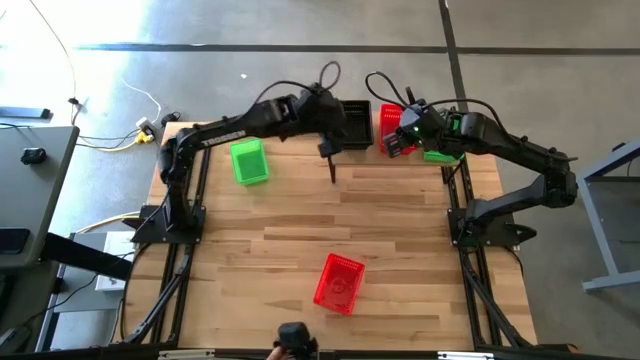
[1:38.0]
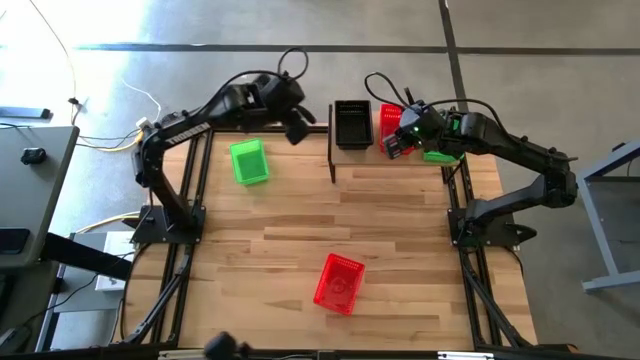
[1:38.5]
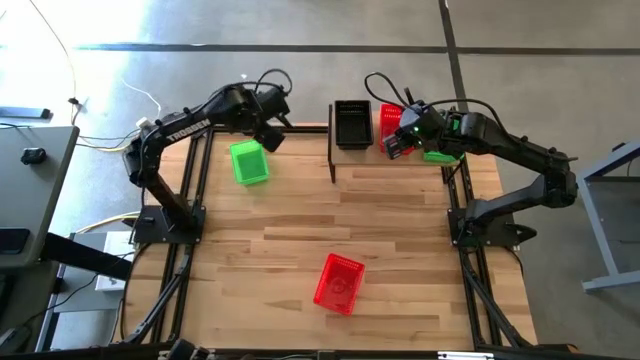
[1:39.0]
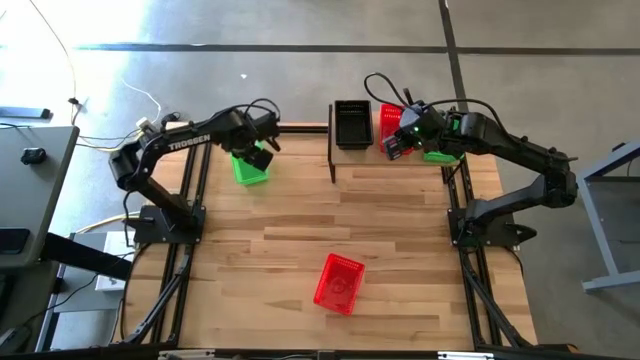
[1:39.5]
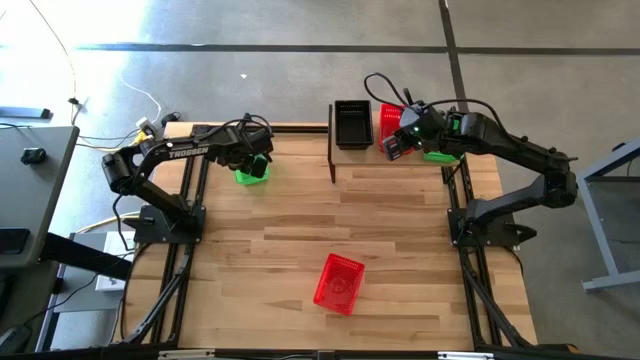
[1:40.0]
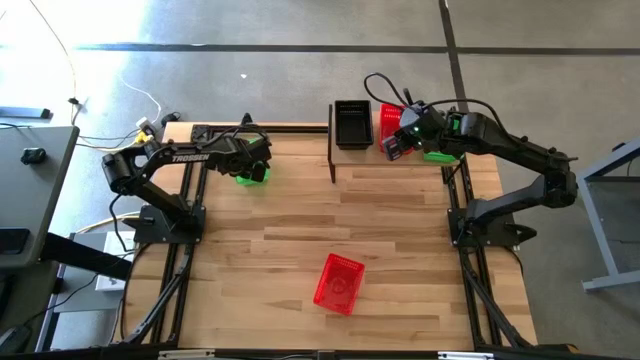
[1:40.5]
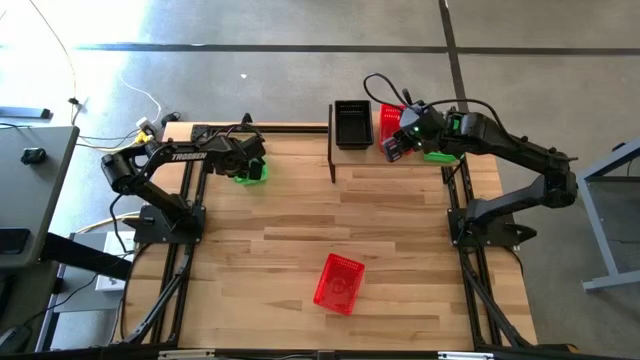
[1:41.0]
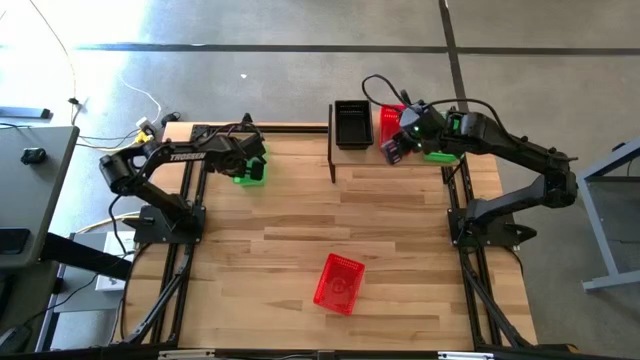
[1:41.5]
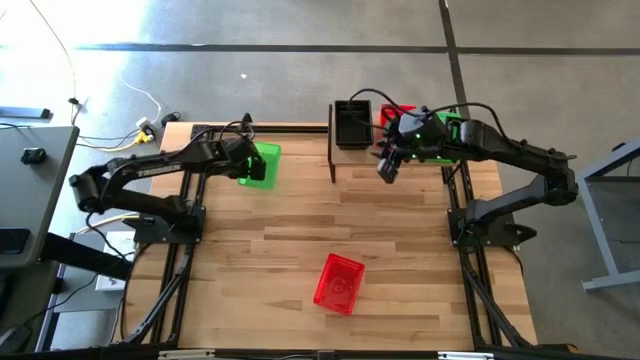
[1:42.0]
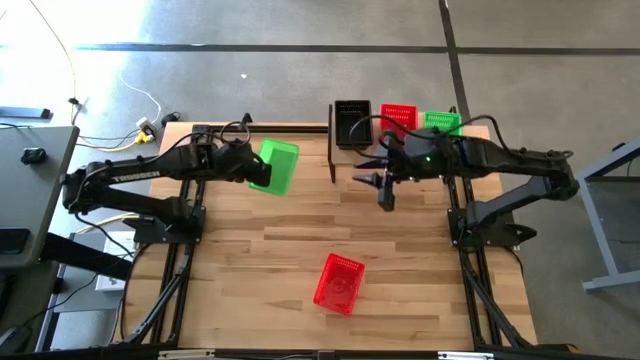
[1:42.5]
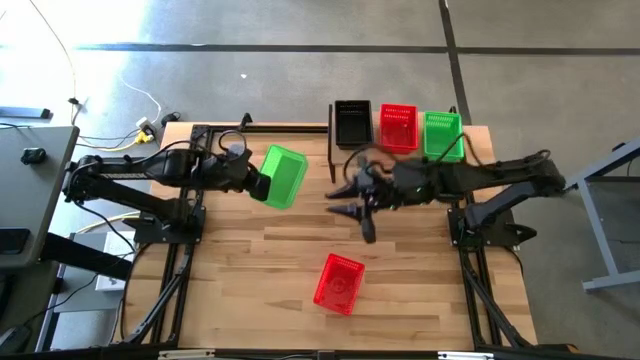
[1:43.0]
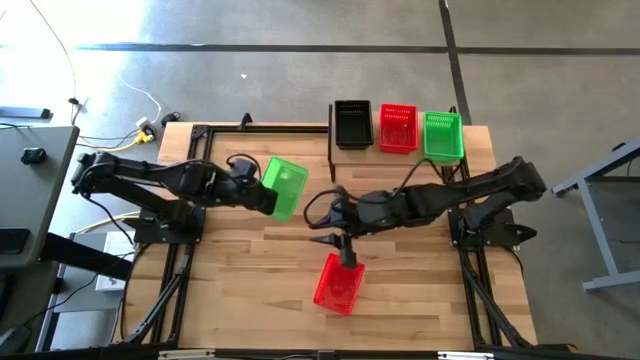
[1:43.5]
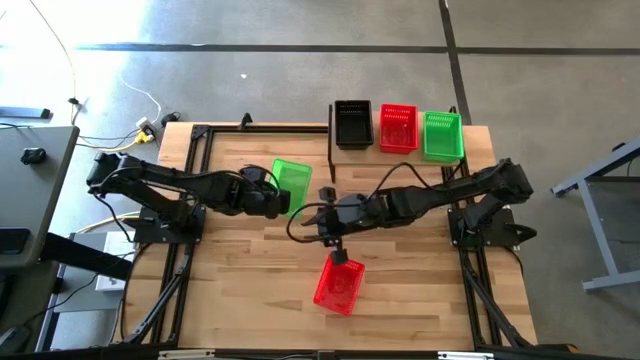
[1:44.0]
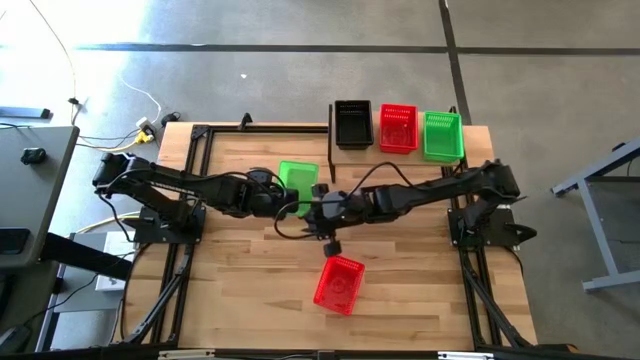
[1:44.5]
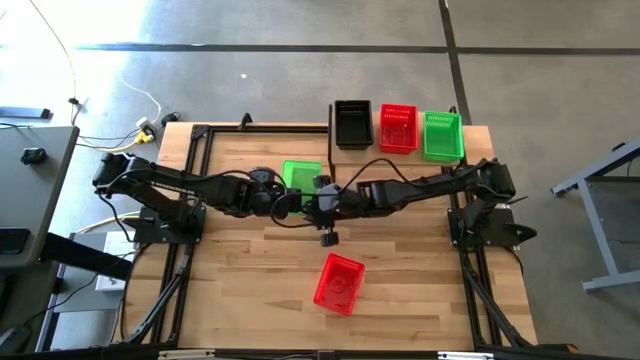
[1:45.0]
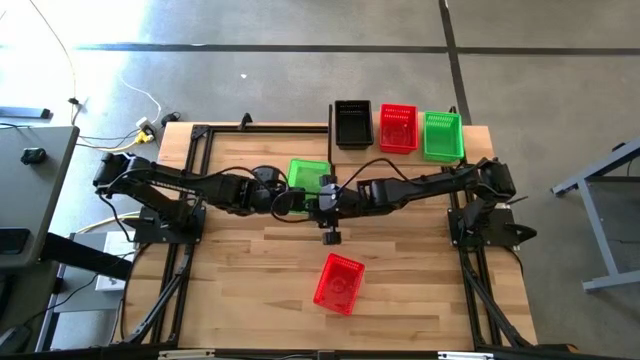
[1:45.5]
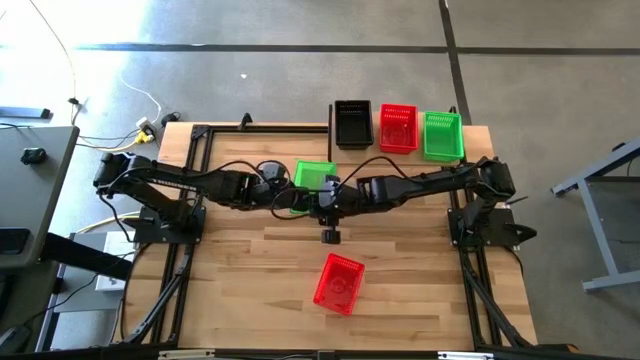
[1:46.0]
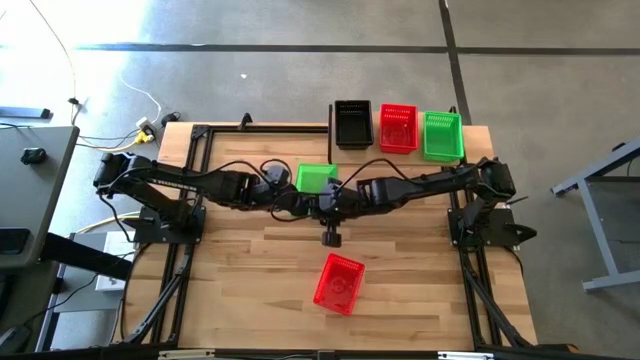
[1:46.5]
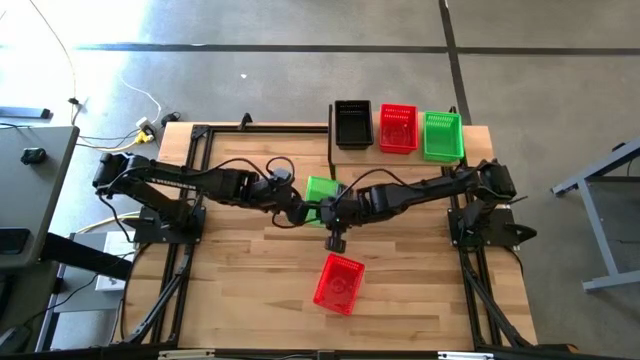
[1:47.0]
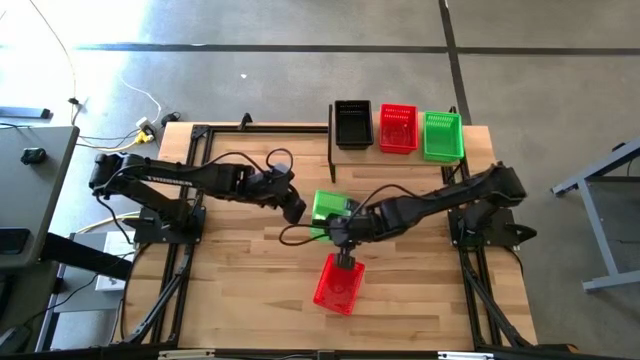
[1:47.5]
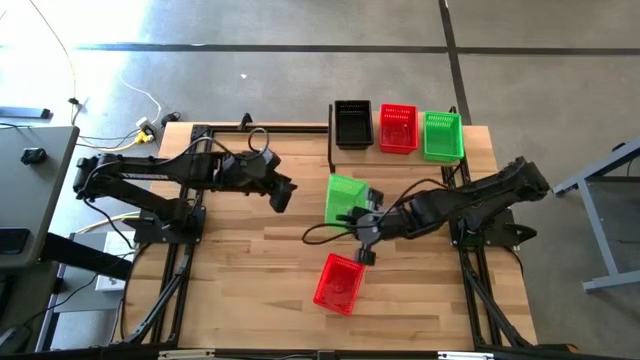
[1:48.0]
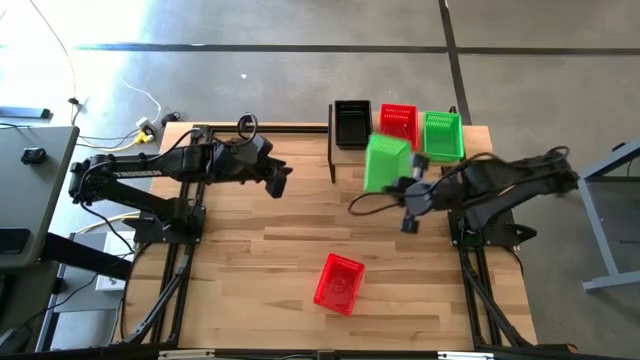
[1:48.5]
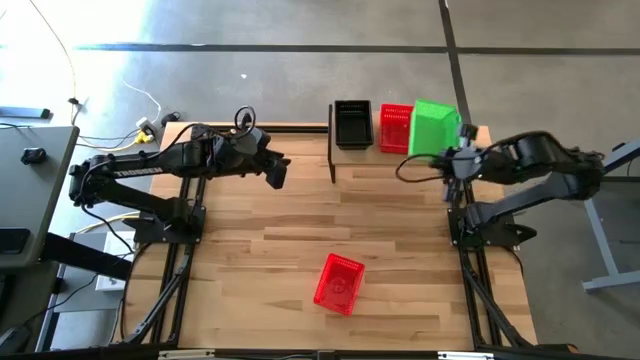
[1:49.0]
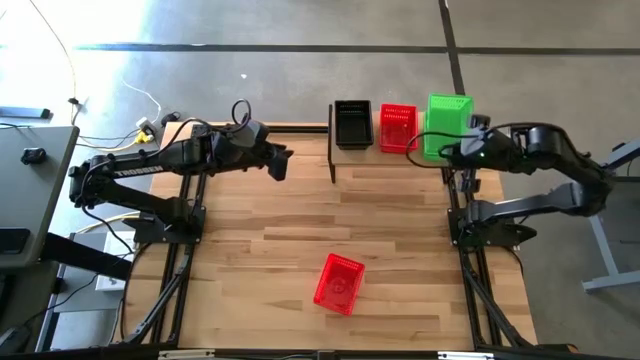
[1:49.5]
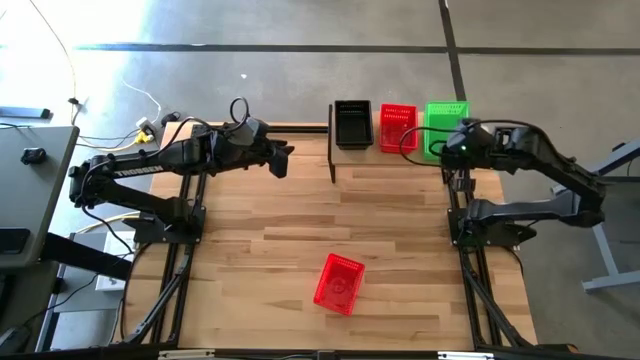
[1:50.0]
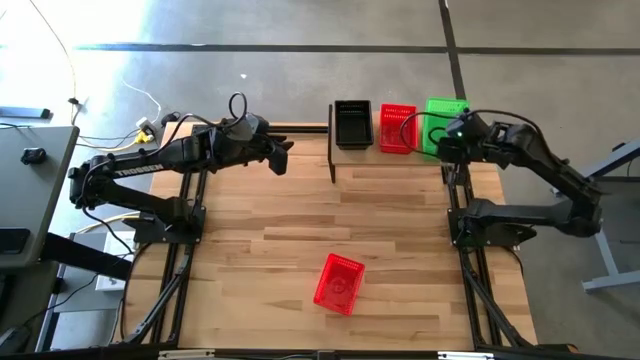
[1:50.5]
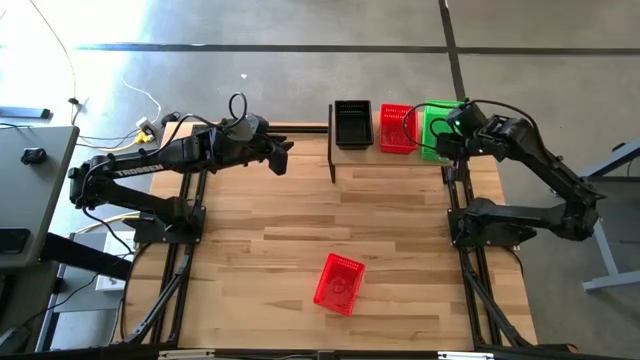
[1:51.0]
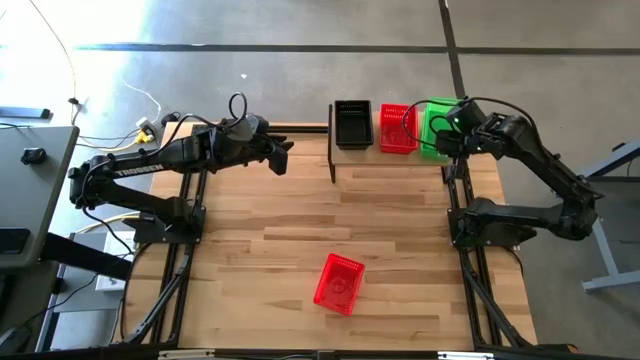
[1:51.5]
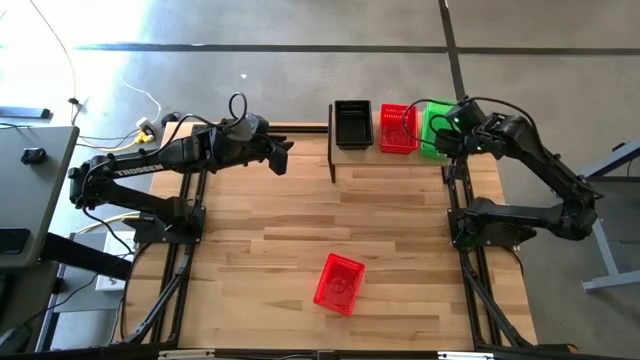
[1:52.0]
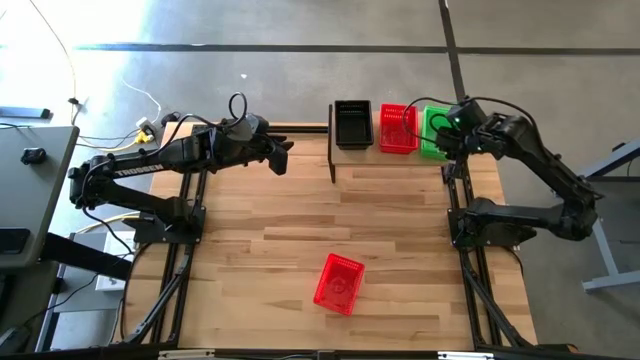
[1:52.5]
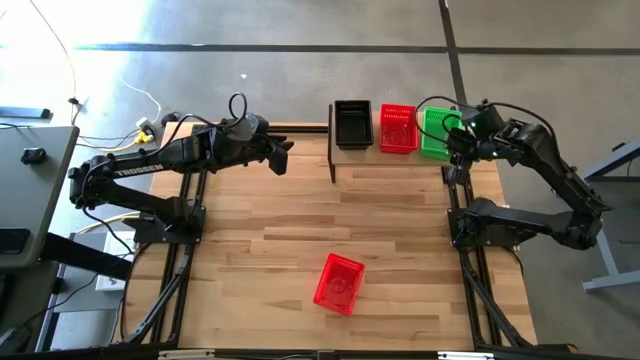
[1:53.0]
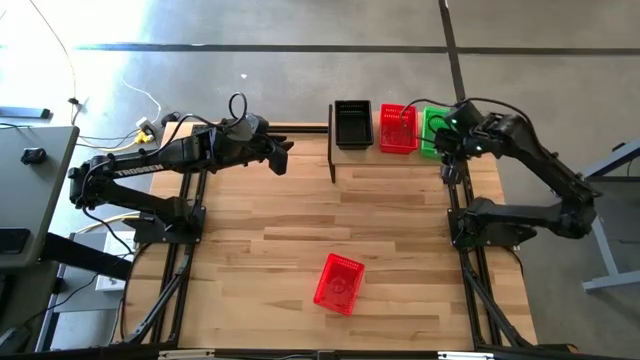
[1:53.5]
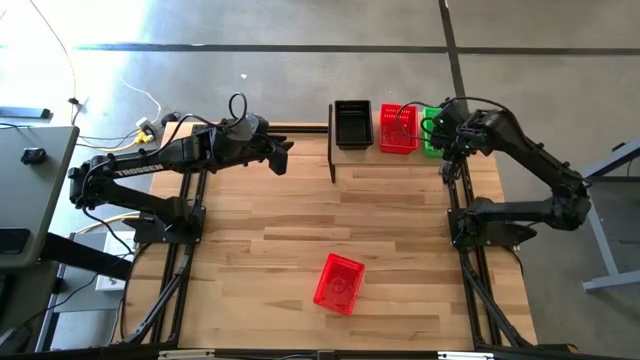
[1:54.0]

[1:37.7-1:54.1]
Task: Stack baskets on shelf by color
Stack the green bin on top of the green bin on the shelf

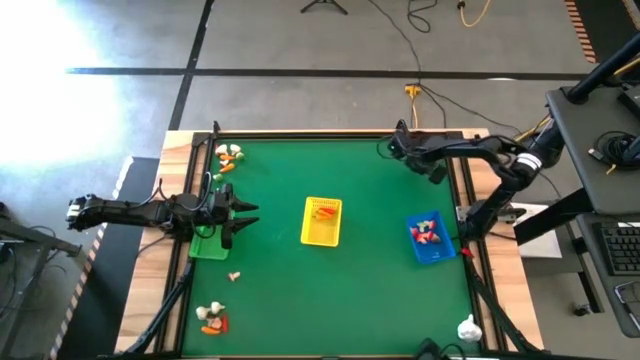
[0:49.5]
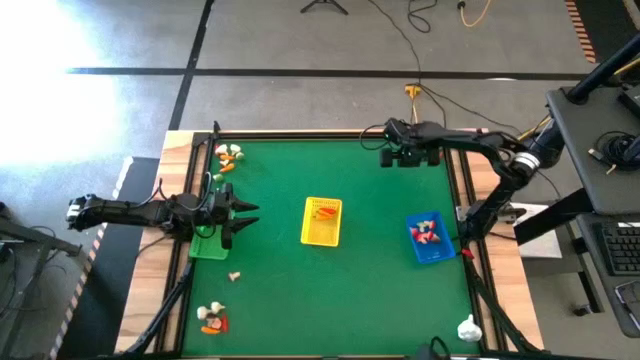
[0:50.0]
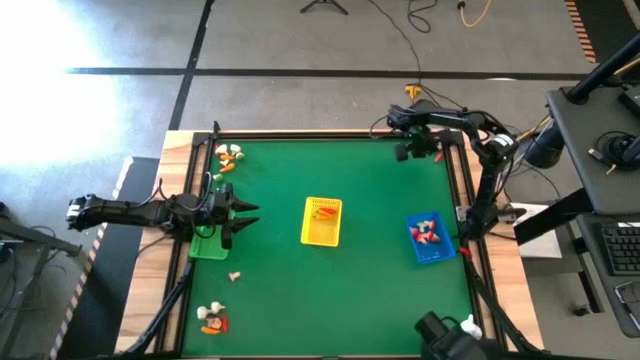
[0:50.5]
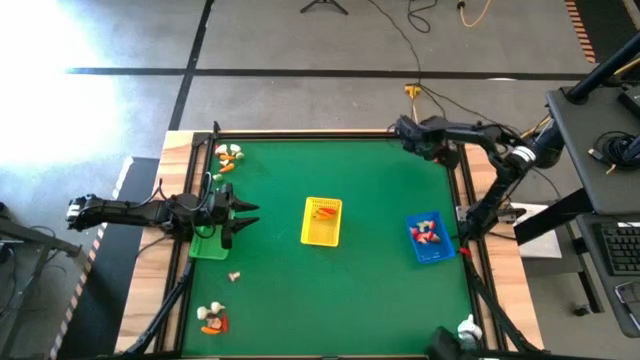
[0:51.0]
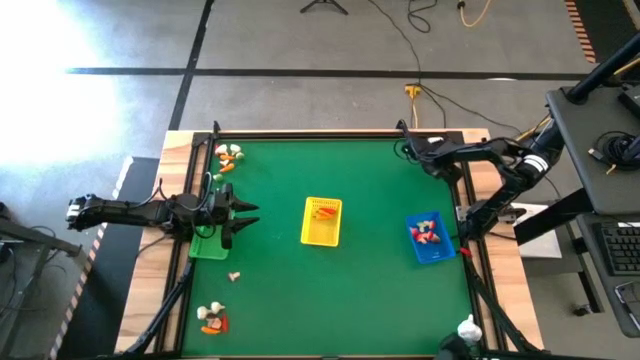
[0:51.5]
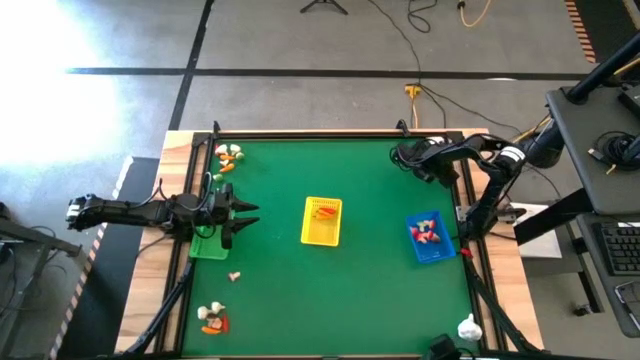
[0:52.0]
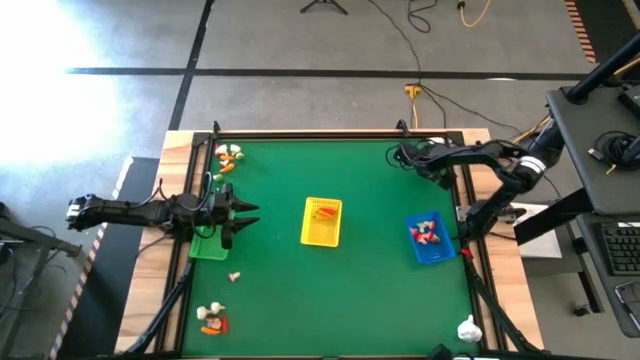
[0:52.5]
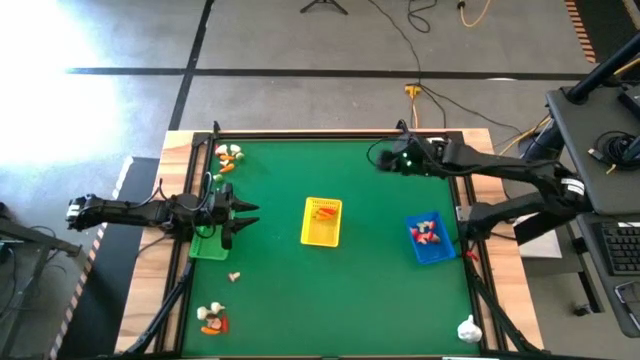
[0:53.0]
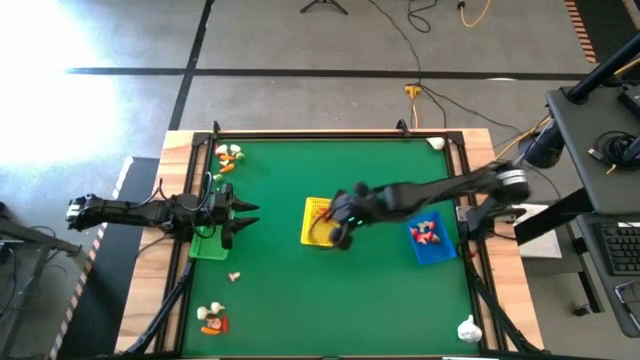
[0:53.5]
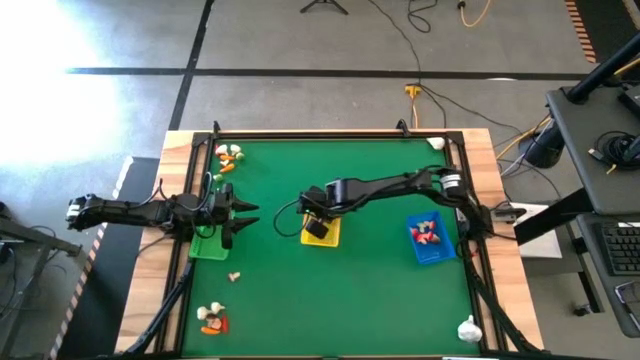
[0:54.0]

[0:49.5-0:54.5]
Task: Sort produce into baskets
Put the red chili pepper into the yellow bin
